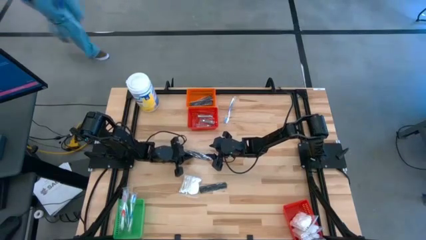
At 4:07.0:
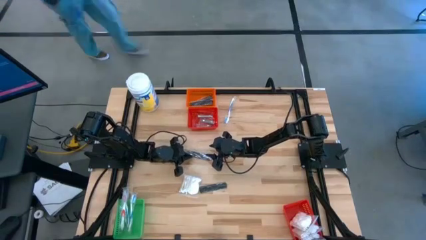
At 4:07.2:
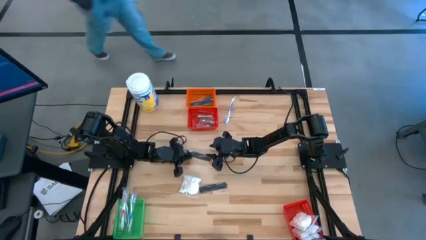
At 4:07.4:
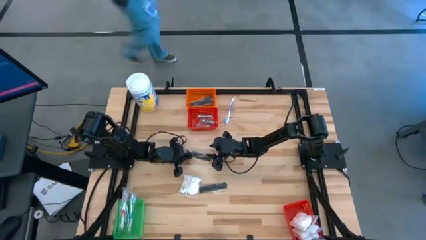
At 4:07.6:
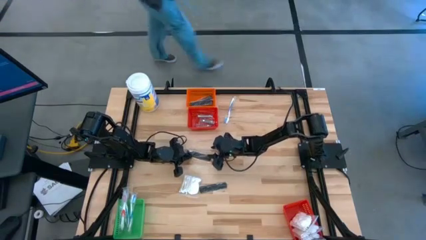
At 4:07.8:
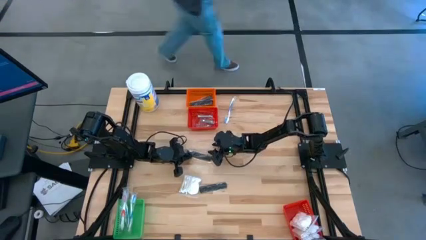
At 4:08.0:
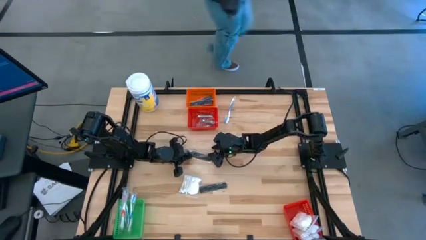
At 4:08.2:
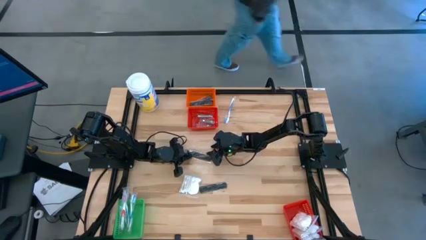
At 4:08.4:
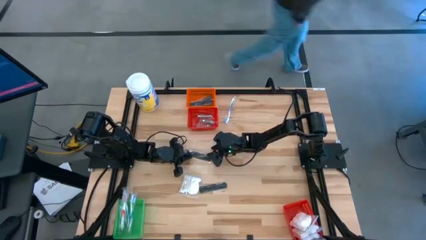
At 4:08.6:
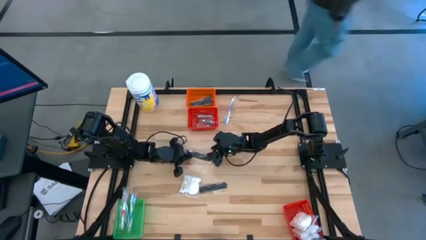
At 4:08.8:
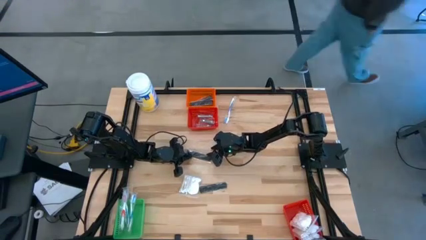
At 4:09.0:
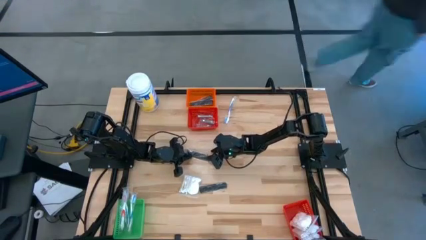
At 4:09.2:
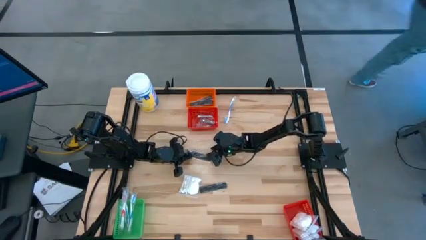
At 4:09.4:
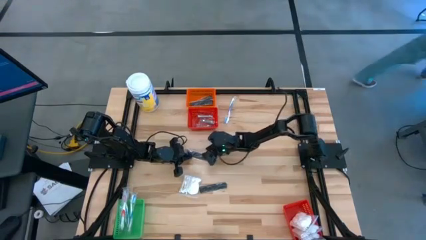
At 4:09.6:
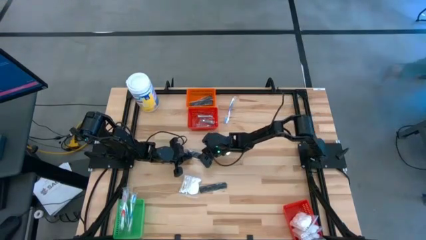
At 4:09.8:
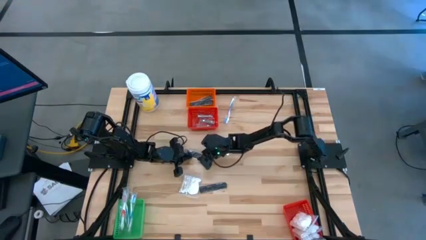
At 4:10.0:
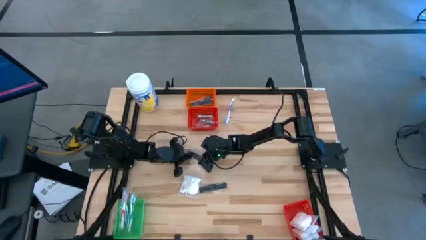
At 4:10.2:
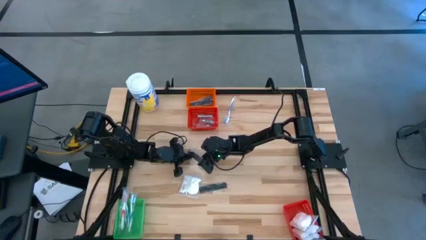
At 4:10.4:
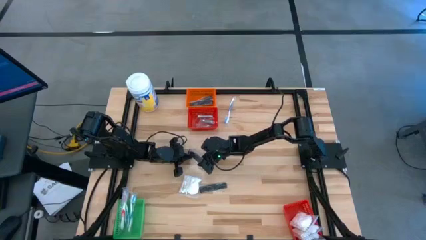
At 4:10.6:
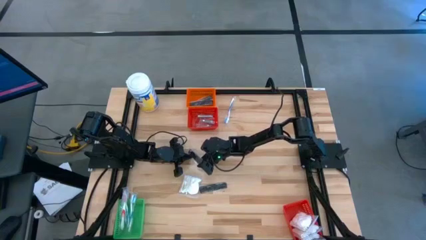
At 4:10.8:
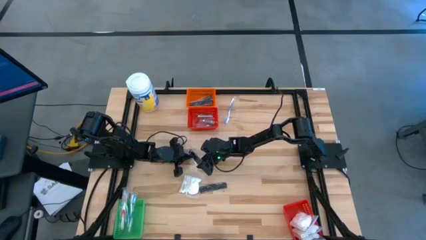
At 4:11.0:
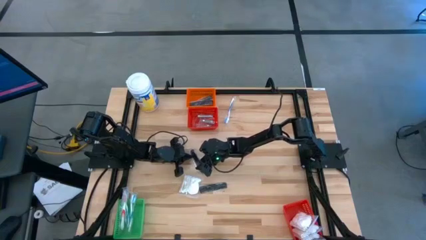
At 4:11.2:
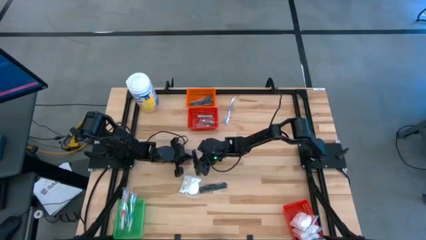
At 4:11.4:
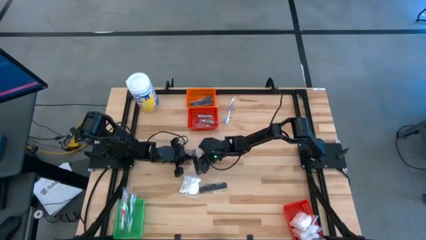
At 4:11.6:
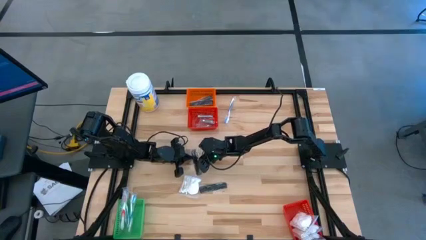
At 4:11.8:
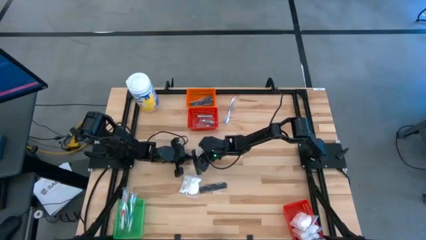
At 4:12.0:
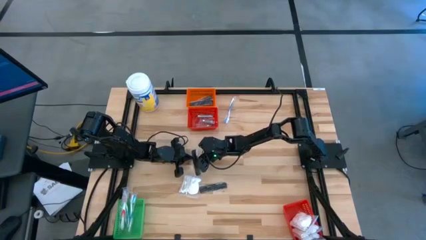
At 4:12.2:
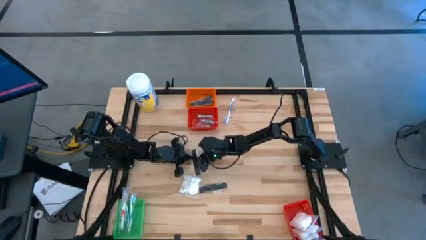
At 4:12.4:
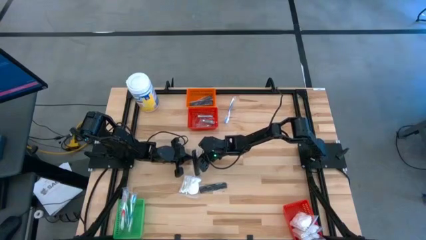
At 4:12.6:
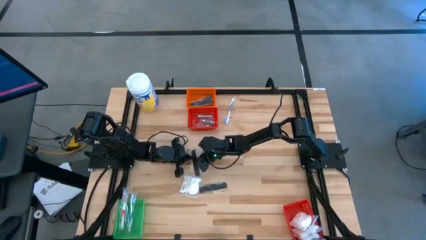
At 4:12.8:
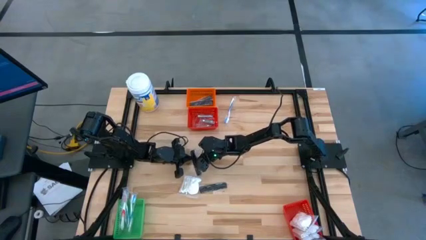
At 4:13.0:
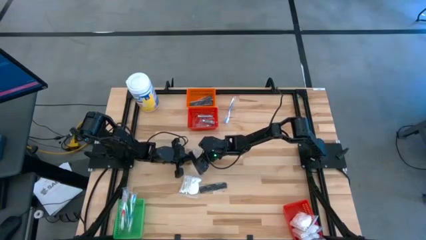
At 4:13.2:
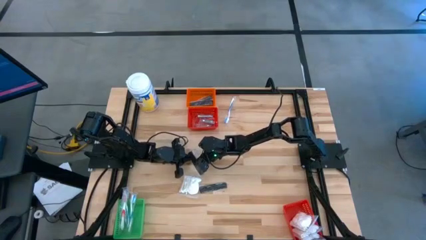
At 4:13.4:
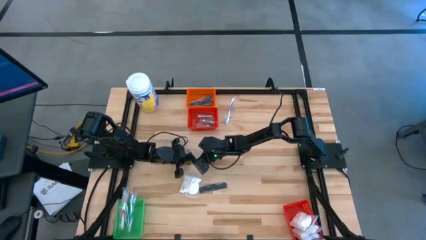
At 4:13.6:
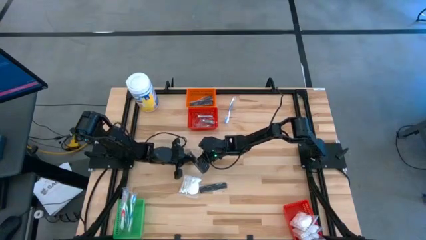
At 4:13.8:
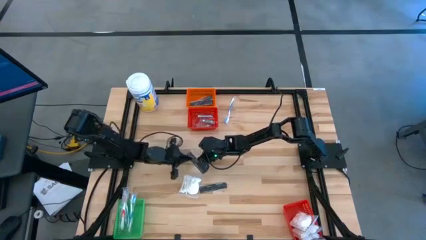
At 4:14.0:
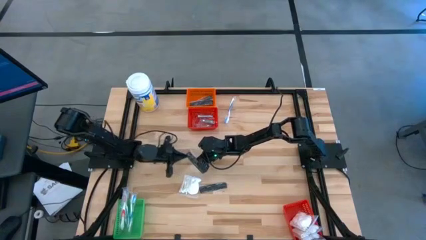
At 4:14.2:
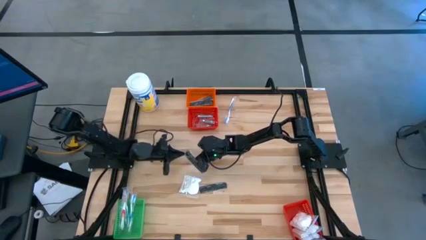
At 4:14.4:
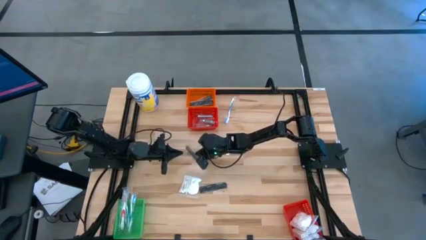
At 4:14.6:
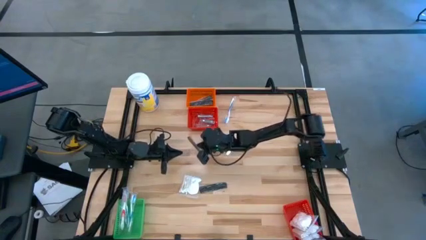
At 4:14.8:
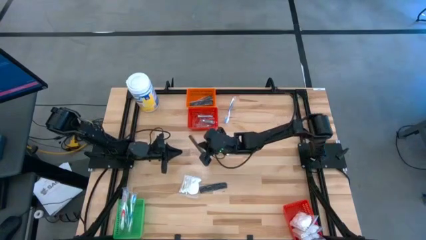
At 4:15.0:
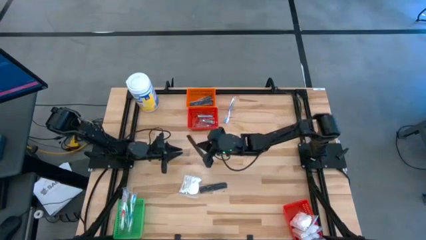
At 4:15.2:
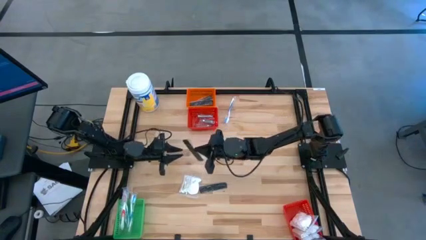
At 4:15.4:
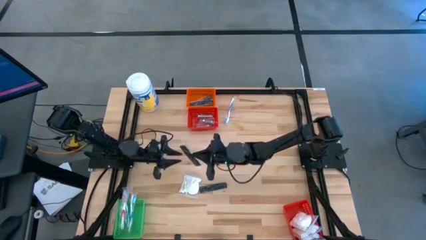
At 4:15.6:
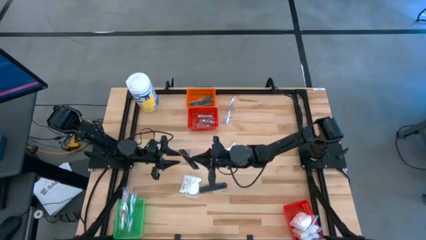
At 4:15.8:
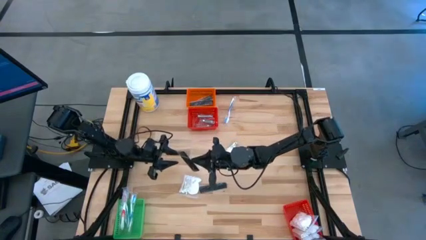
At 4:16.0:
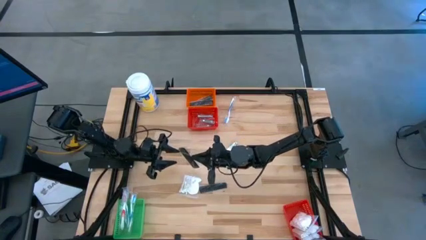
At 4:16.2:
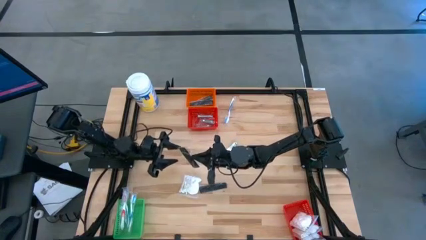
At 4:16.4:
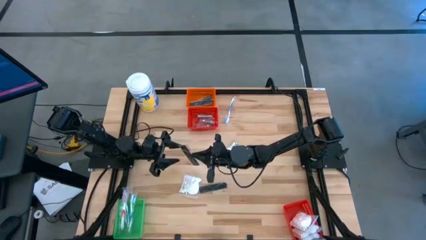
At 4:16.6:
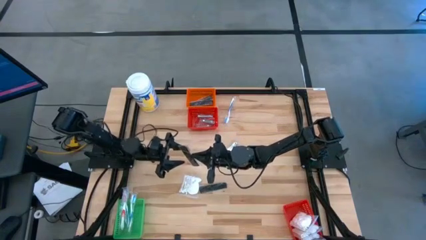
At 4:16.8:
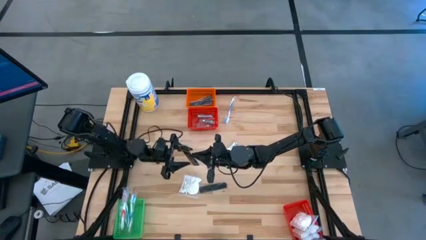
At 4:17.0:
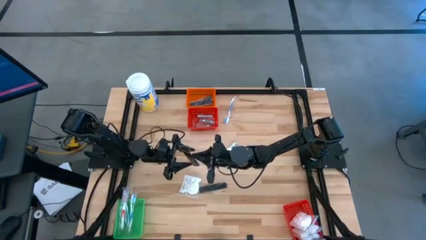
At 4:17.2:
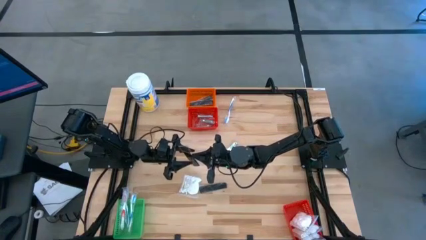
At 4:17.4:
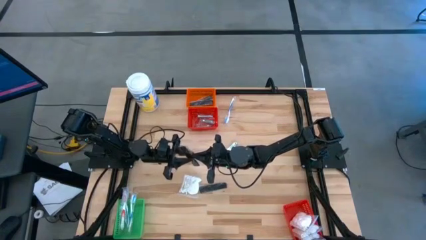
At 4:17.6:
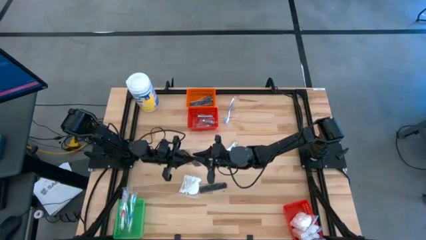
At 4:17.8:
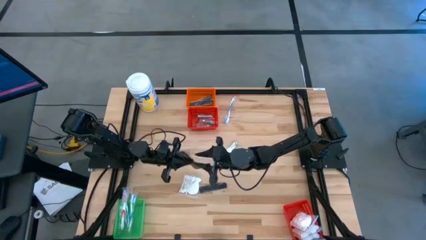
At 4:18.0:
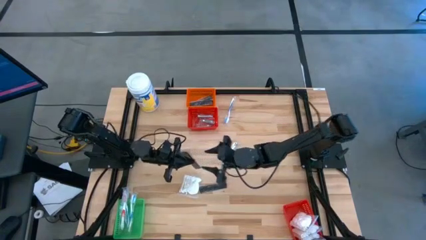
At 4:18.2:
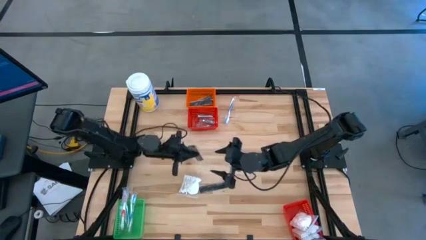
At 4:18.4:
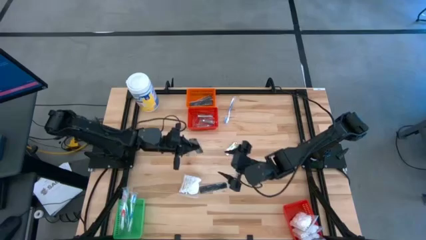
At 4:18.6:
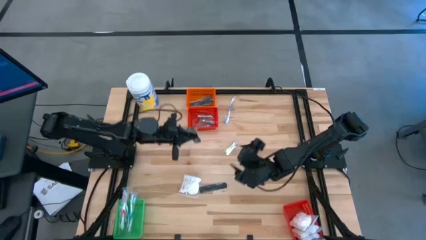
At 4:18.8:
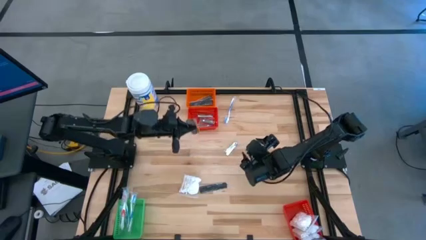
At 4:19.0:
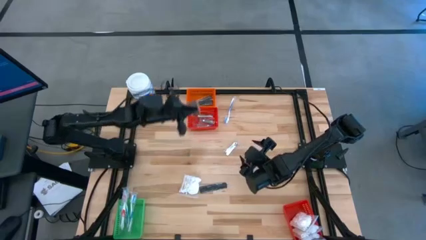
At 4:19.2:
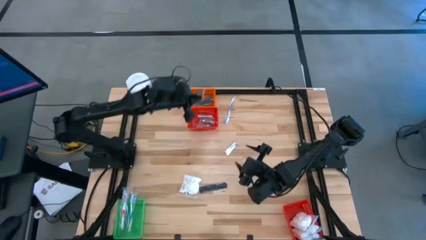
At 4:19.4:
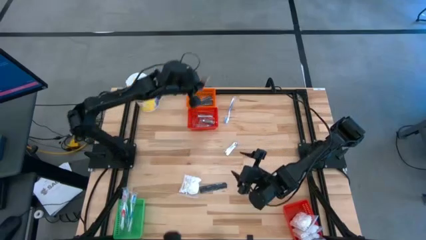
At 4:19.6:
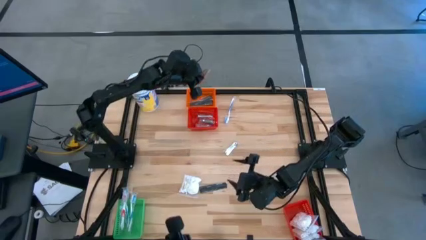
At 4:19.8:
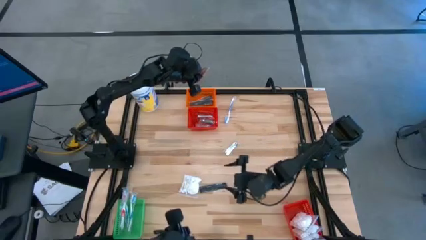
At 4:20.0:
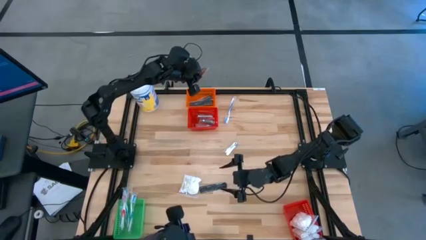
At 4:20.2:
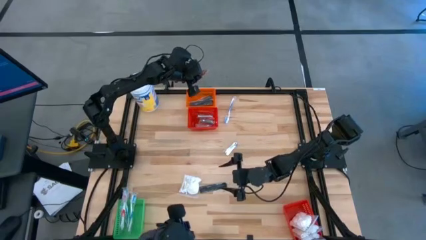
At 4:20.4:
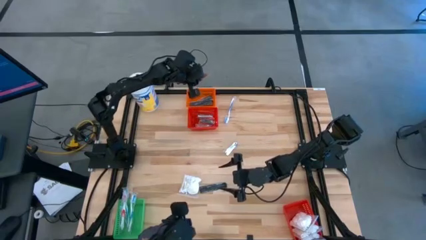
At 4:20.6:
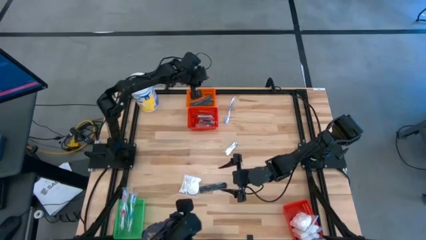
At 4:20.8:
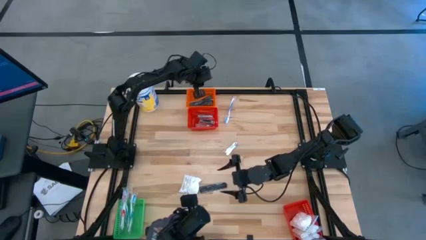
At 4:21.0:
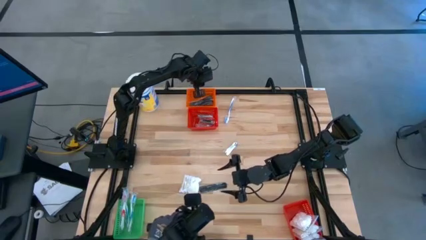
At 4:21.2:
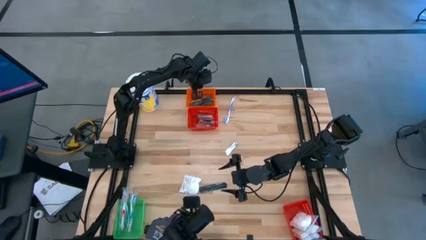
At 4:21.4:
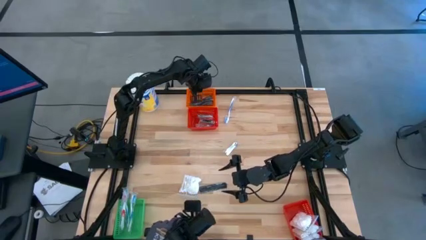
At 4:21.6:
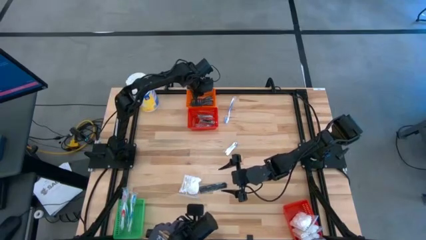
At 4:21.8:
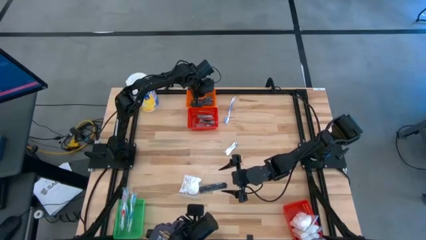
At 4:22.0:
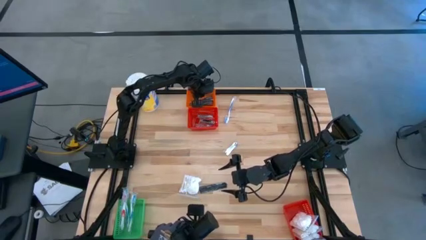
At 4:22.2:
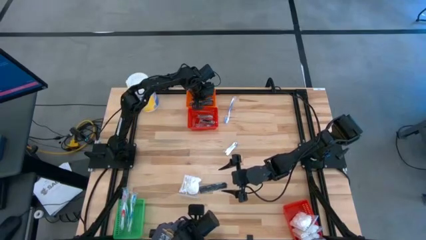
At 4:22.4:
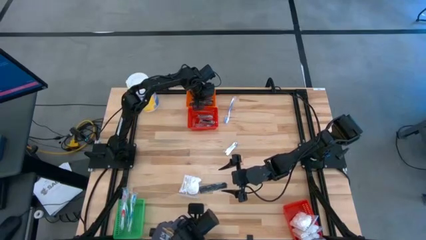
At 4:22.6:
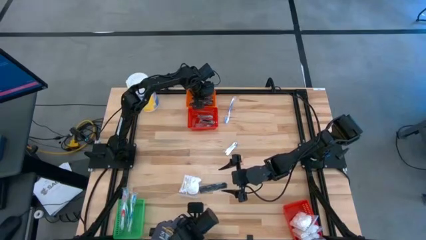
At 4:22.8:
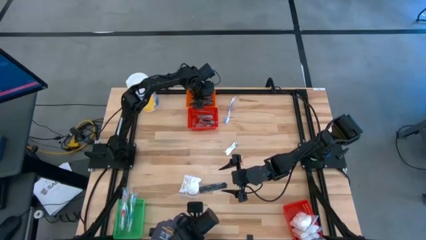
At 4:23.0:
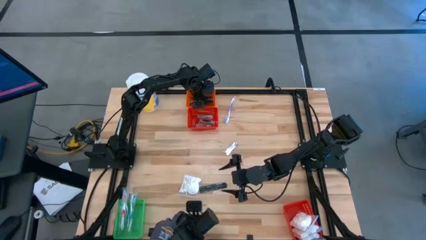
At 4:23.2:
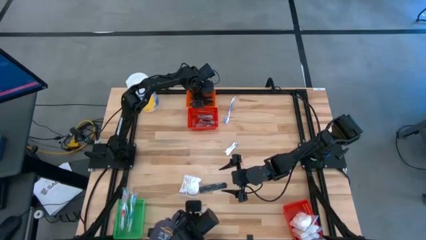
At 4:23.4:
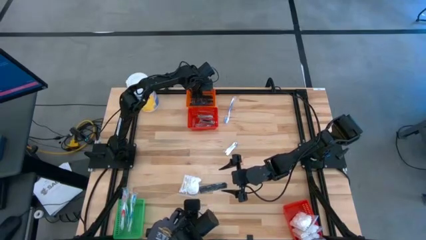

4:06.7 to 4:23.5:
Task: Pick & Place Travel size toiletries
Put the comb into the orange basket
